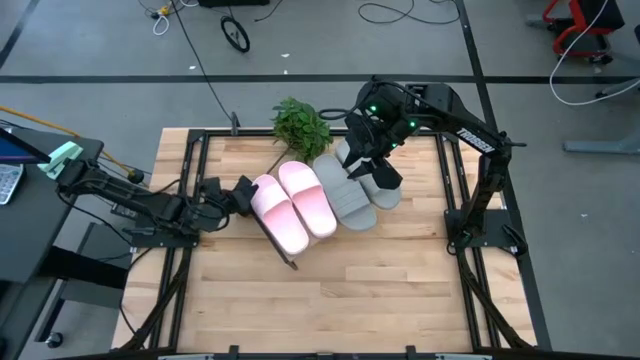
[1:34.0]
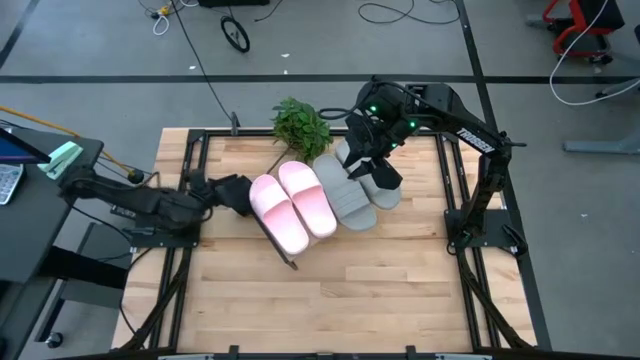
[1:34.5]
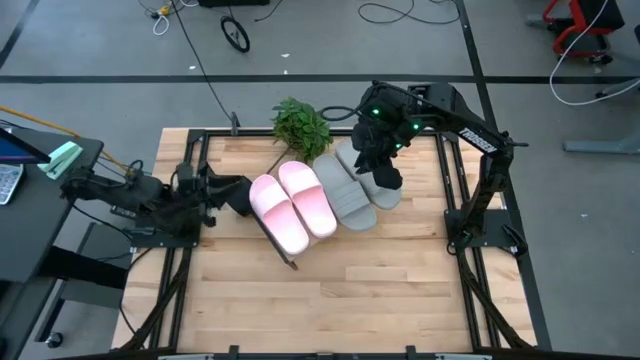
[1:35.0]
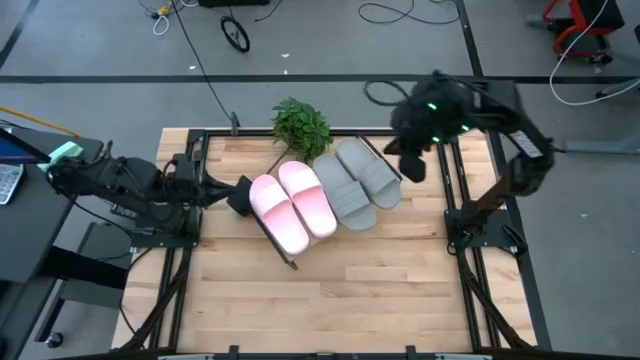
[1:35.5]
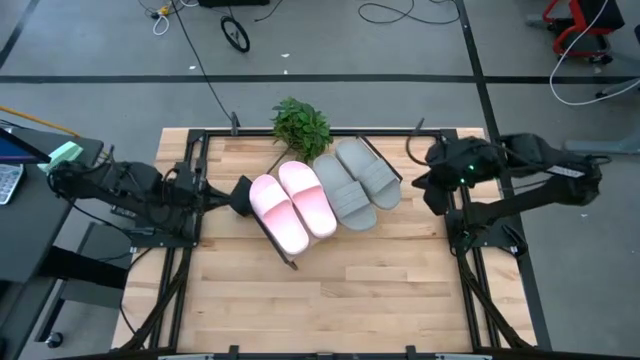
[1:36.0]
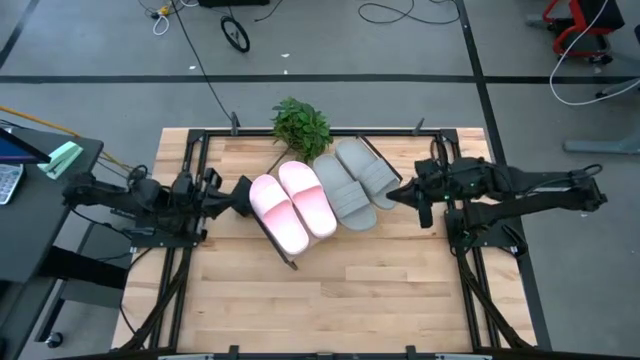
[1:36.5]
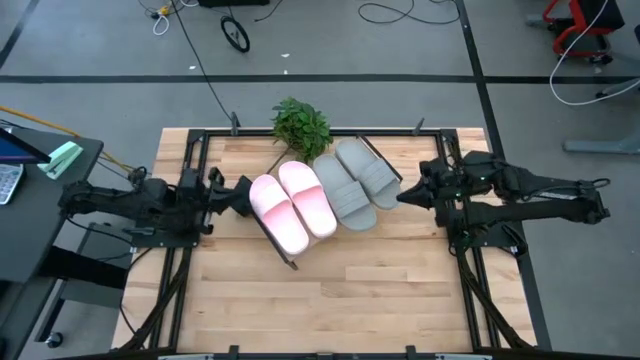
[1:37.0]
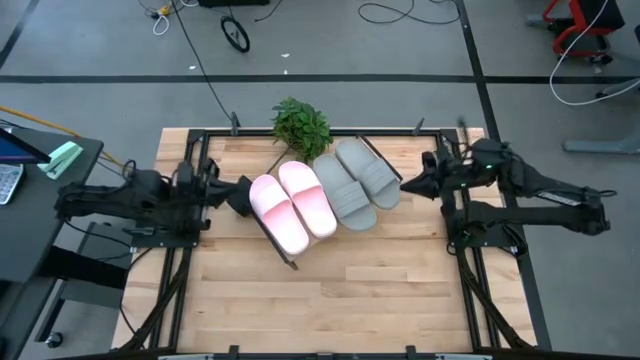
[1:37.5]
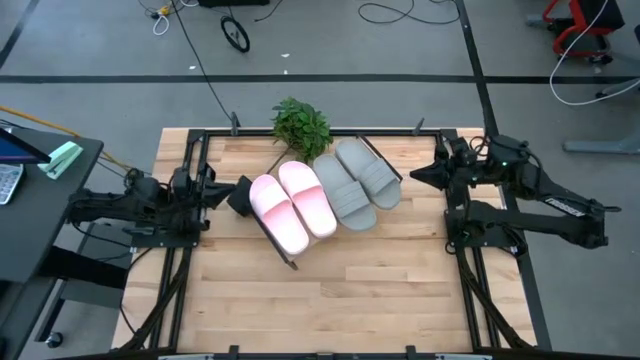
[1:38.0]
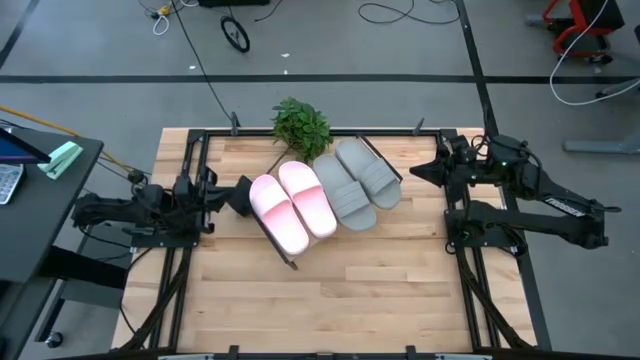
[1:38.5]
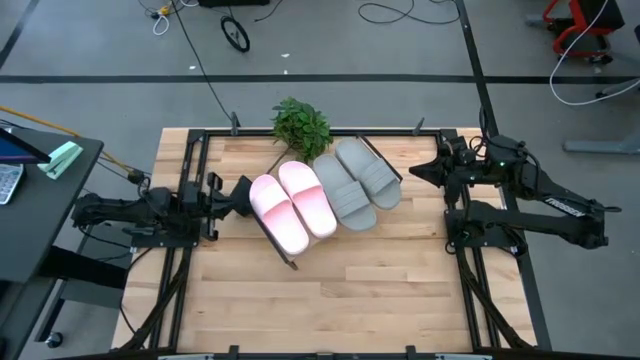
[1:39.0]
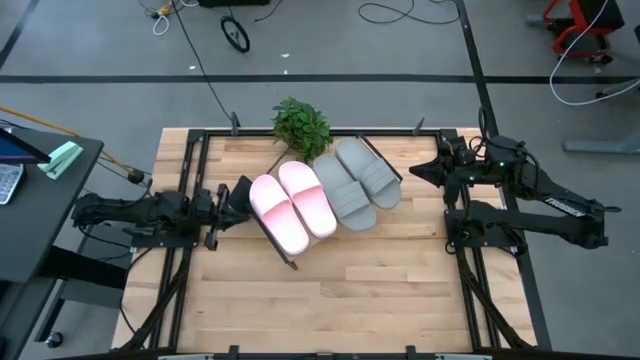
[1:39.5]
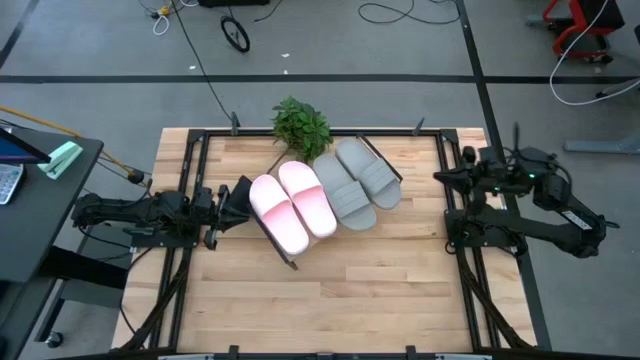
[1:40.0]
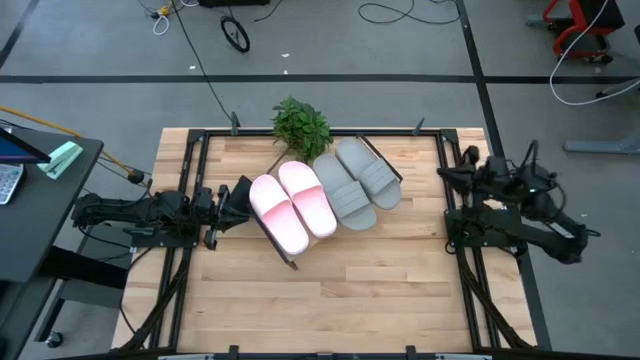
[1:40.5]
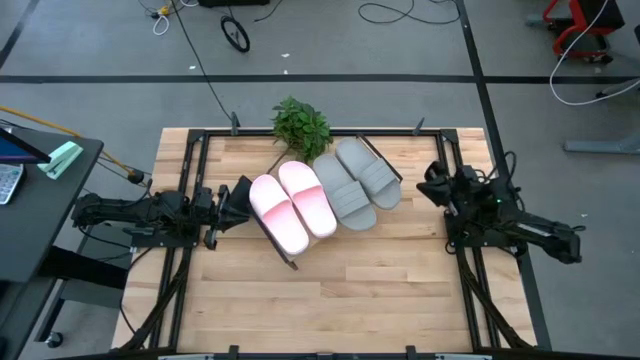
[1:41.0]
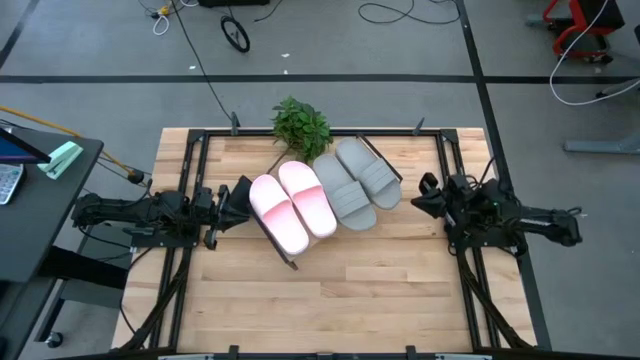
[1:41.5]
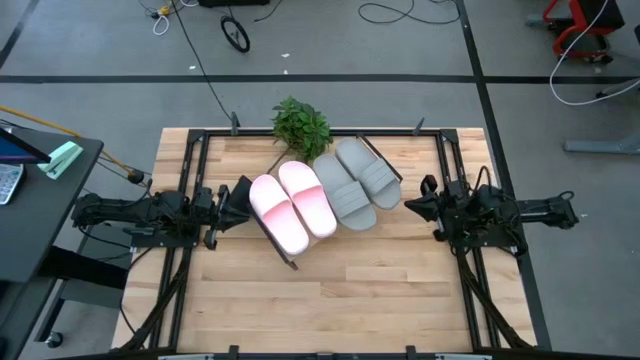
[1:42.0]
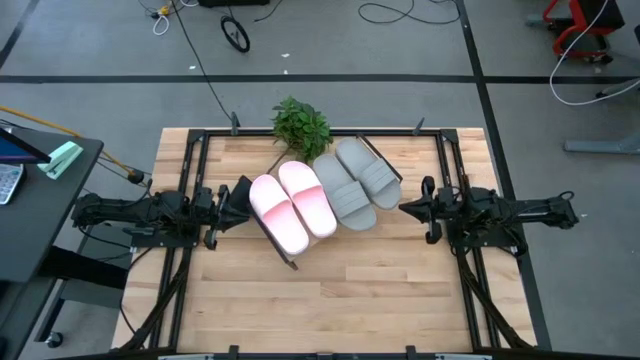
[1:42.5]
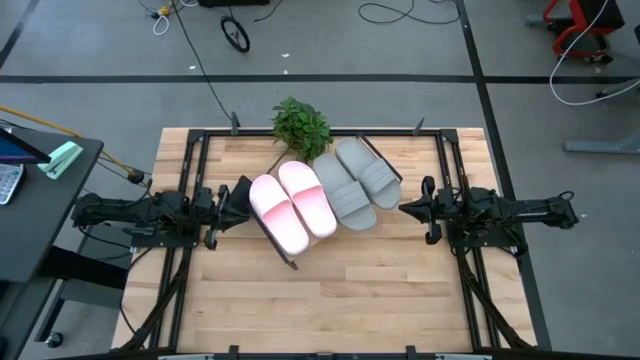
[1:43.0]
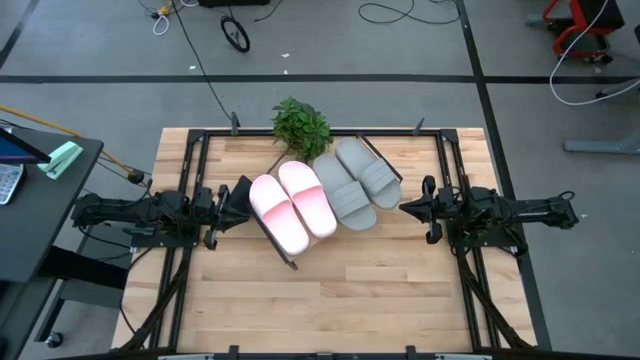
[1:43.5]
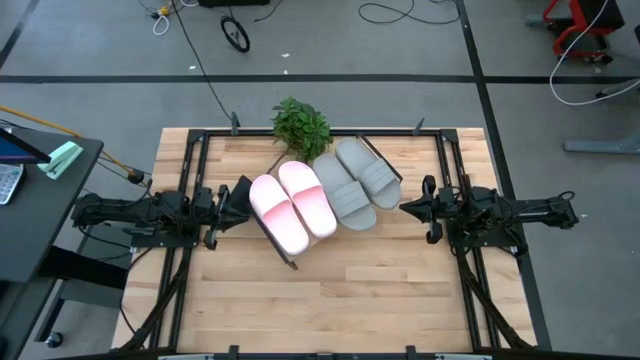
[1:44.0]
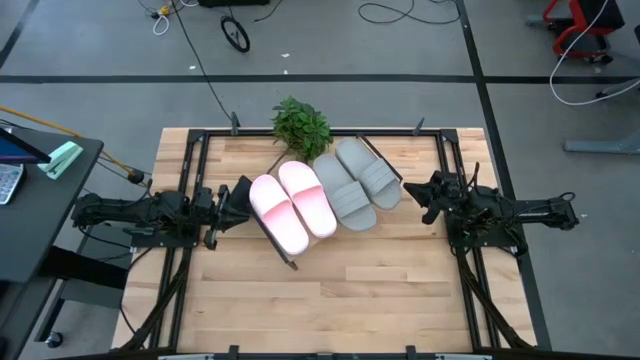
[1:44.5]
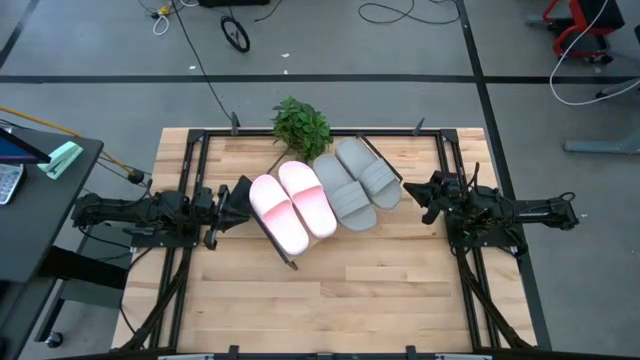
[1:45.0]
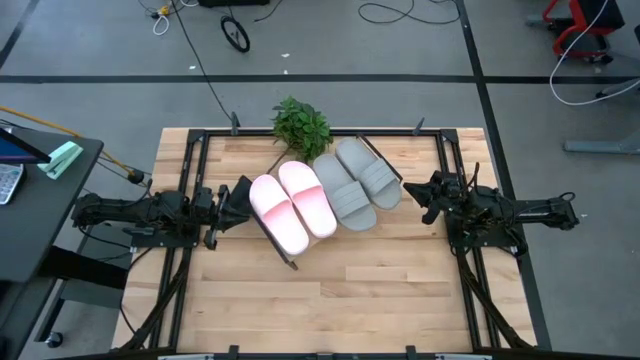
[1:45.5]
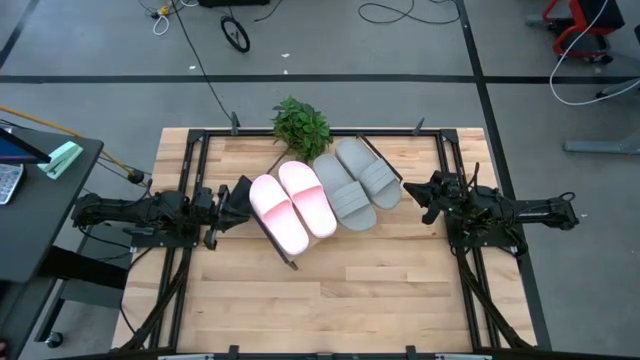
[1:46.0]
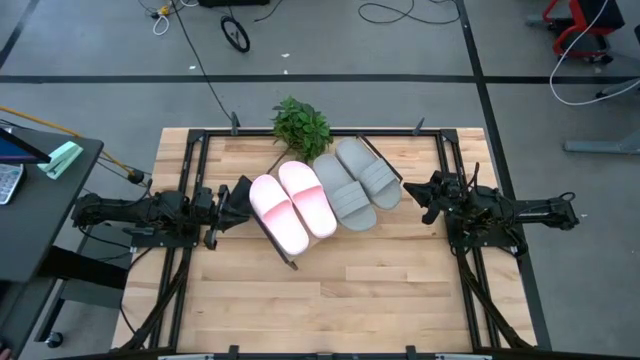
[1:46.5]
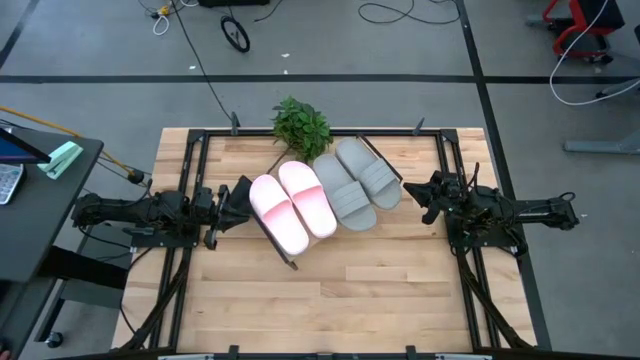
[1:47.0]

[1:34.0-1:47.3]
Task: Pick and place slides into the shelf
Return to Home Position

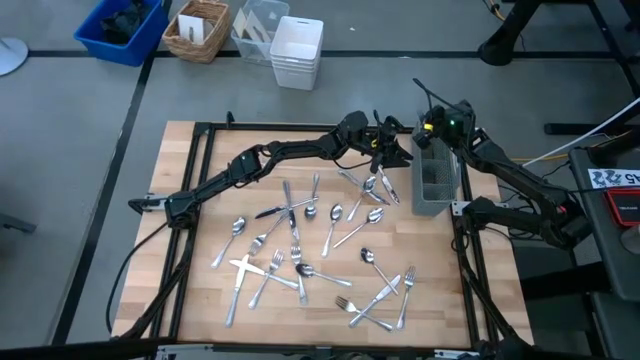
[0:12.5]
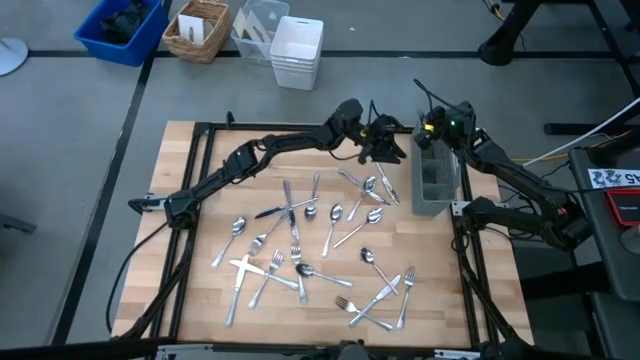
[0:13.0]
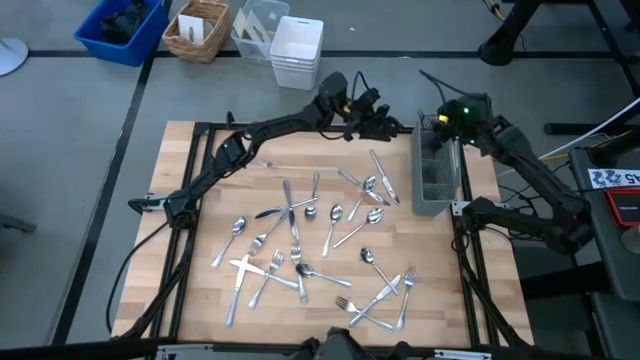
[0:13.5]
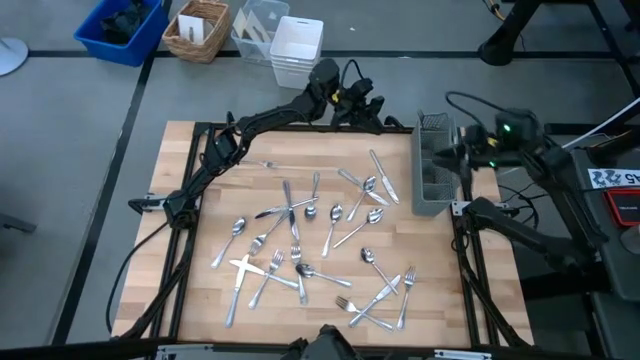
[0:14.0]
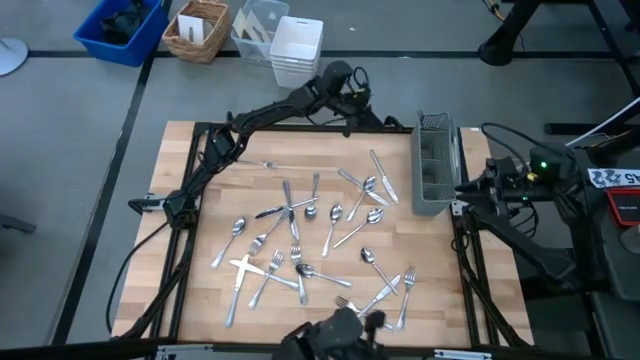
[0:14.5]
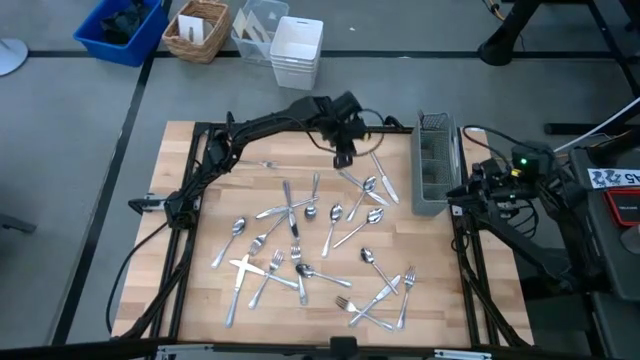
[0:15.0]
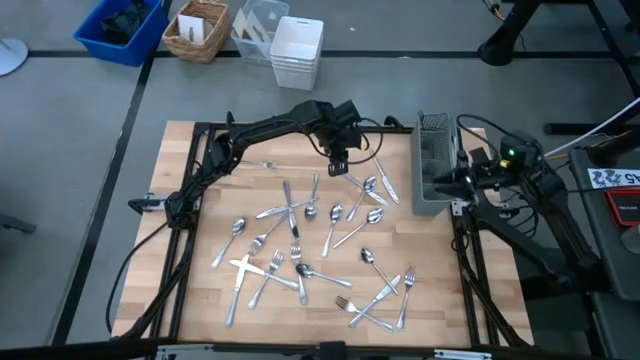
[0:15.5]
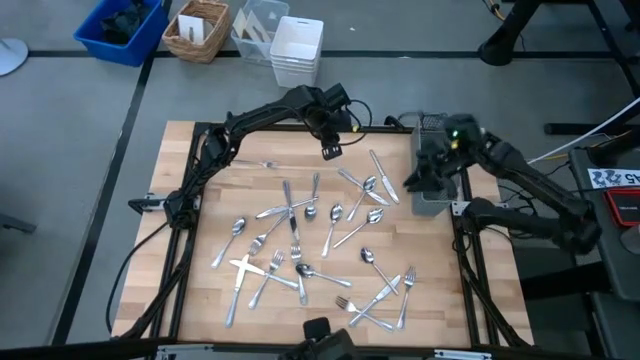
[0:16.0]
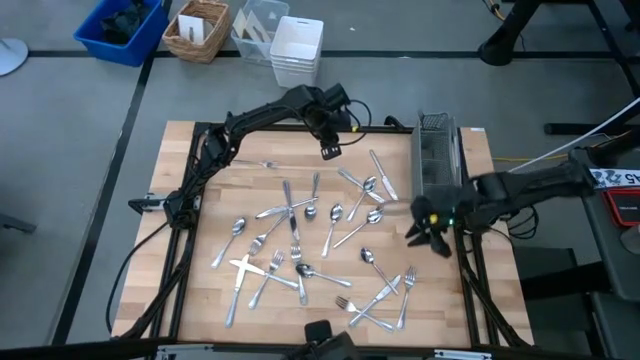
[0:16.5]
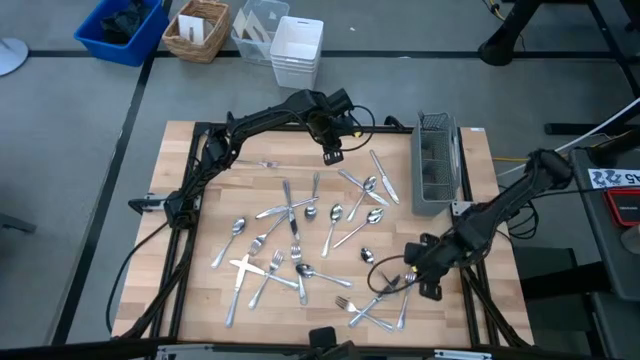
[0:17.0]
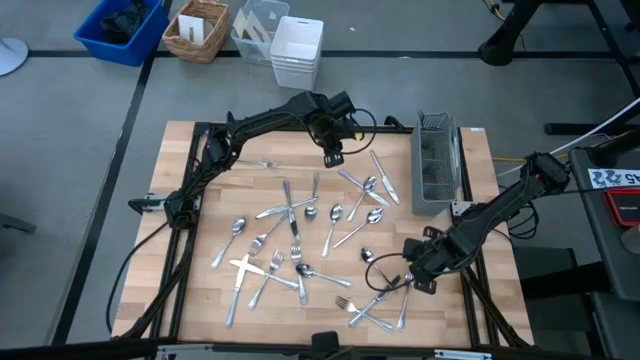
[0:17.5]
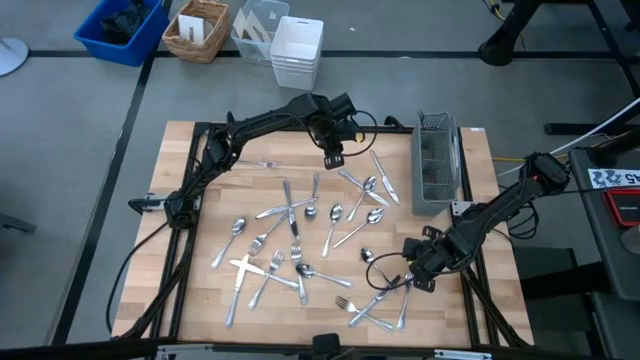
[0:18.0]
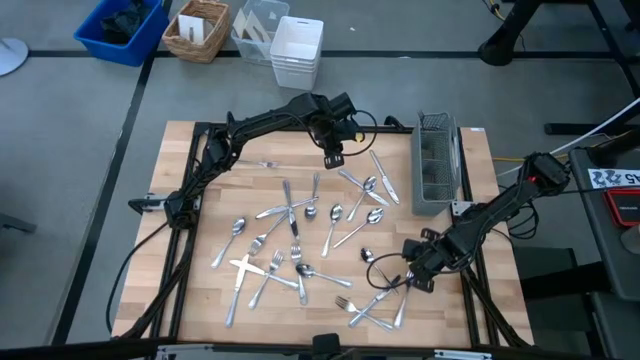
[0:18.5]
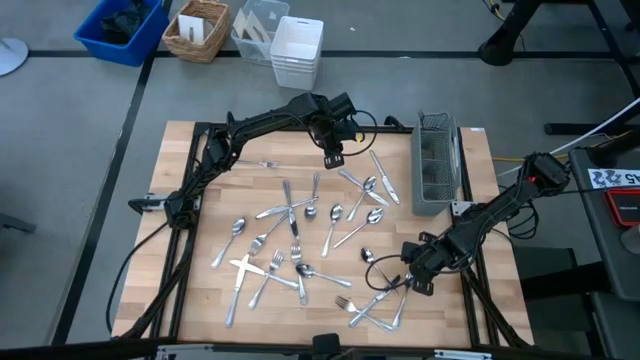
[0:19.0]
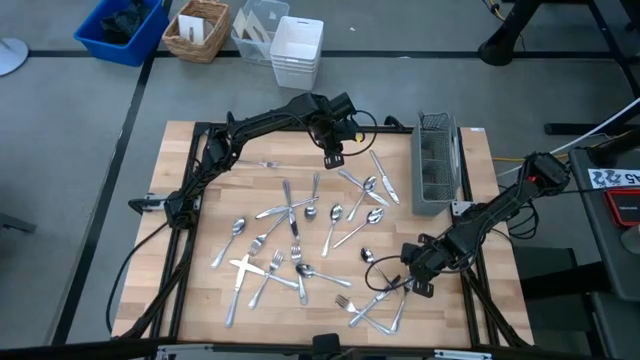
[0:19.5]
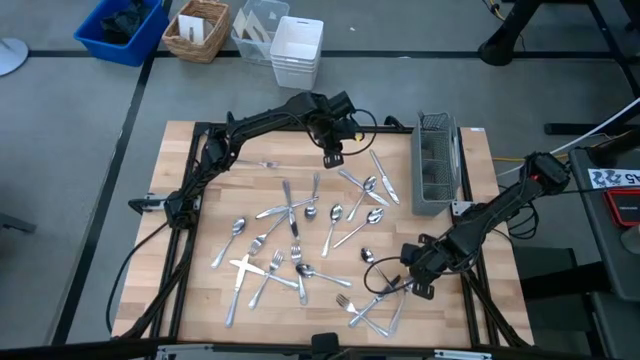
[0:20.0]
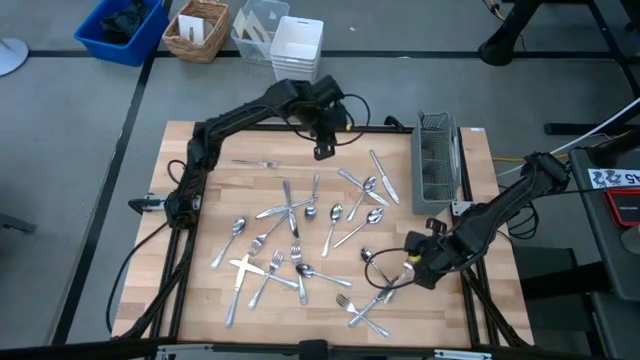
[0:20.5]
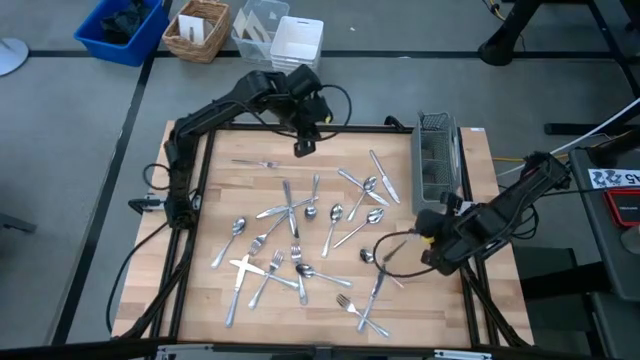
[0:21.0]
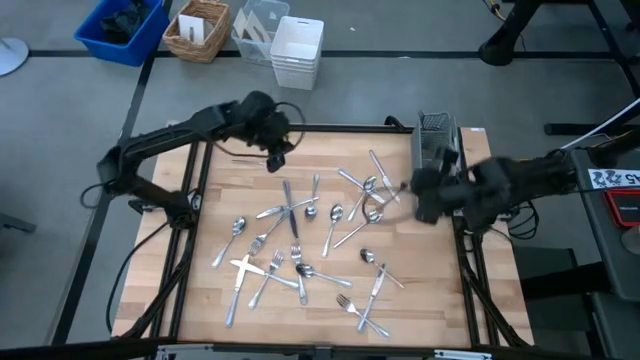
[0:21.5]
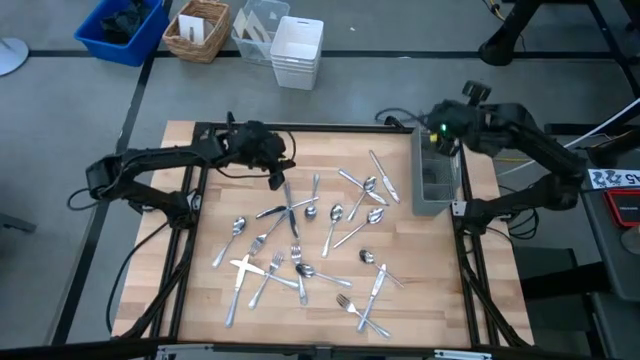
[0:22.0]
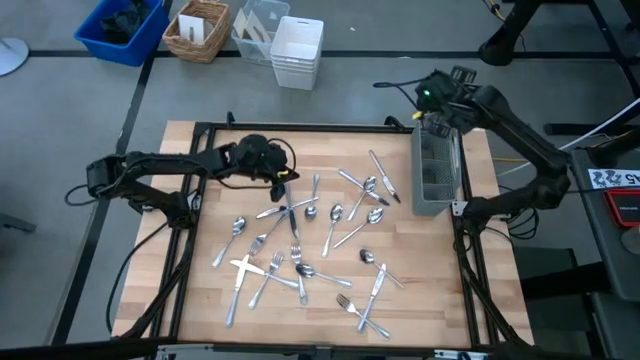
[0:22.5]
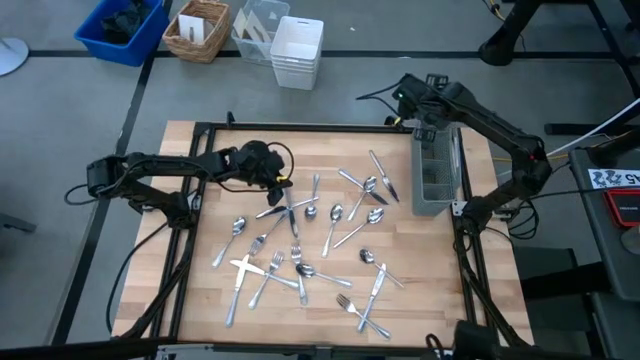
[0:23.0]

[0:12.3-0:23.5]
Task: Sort silverware
Put the fork into the left section of the utensil holder
